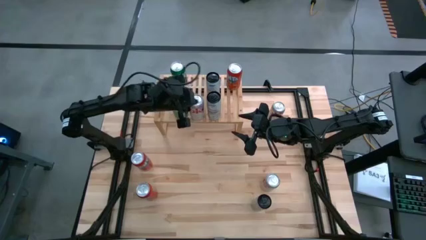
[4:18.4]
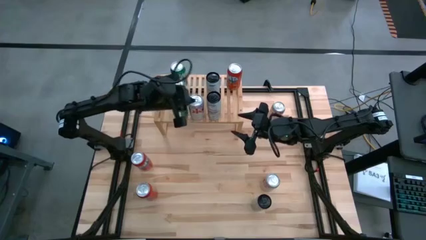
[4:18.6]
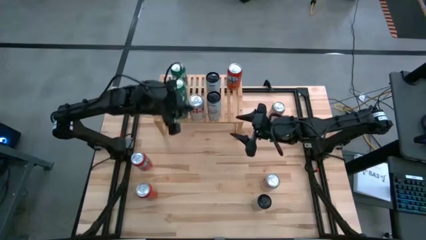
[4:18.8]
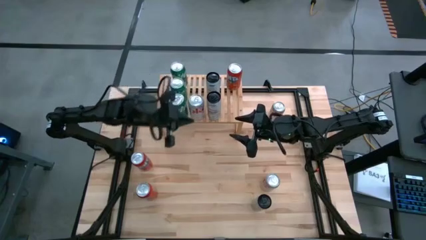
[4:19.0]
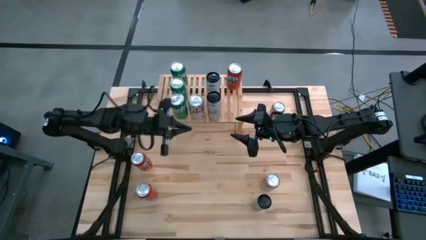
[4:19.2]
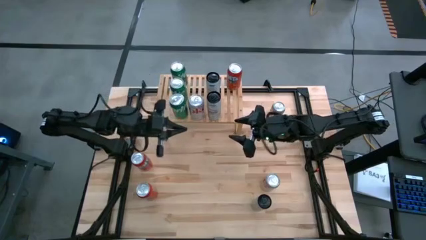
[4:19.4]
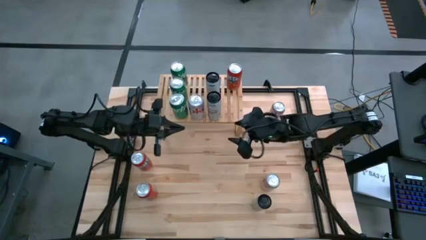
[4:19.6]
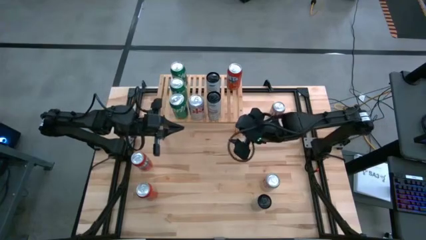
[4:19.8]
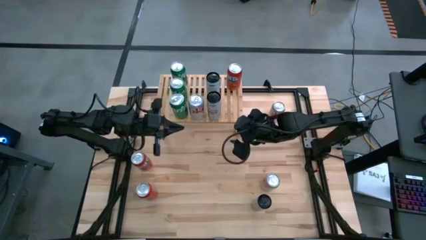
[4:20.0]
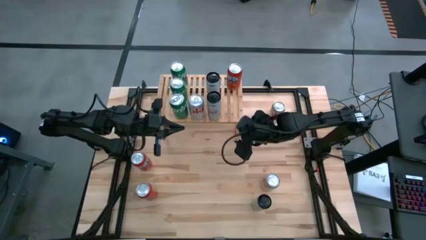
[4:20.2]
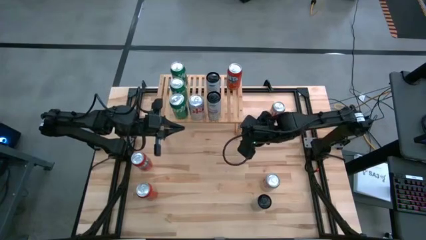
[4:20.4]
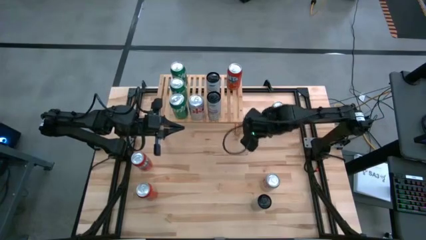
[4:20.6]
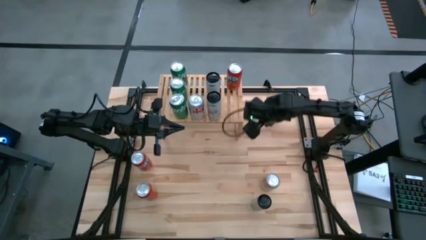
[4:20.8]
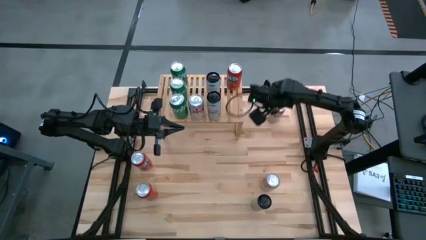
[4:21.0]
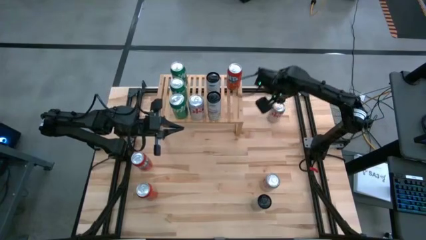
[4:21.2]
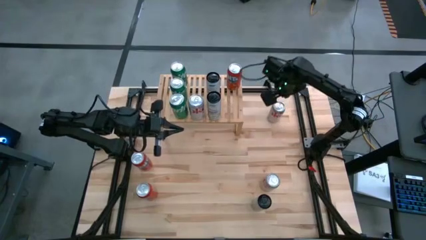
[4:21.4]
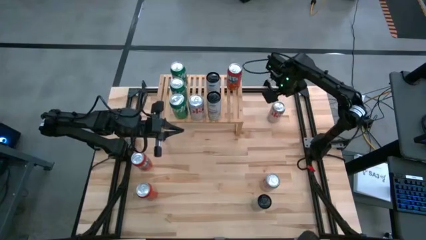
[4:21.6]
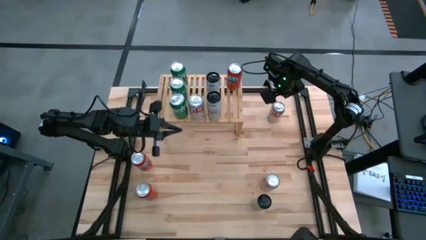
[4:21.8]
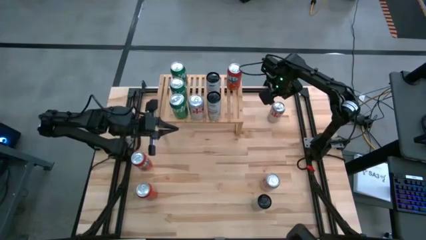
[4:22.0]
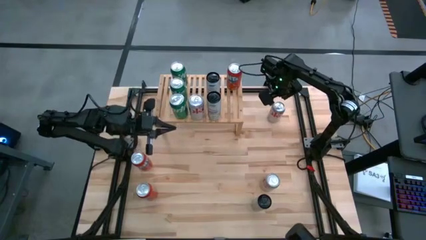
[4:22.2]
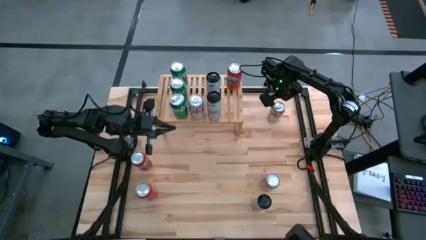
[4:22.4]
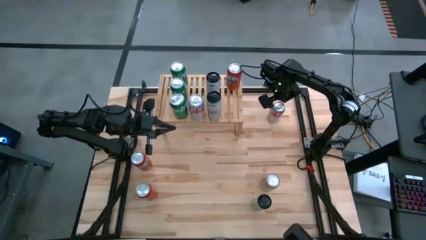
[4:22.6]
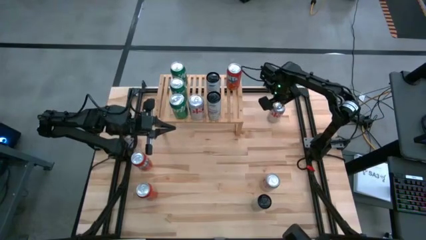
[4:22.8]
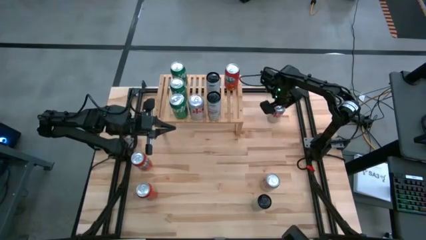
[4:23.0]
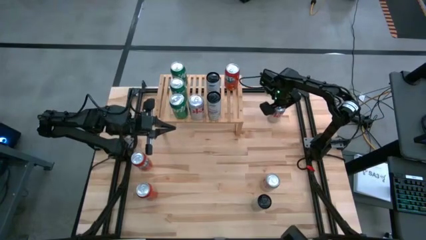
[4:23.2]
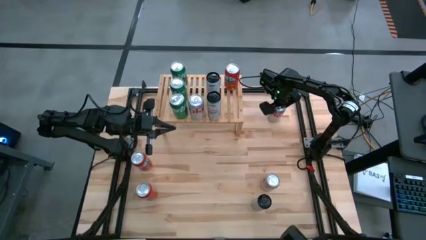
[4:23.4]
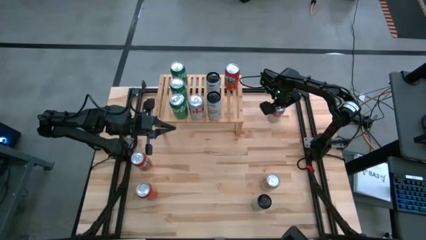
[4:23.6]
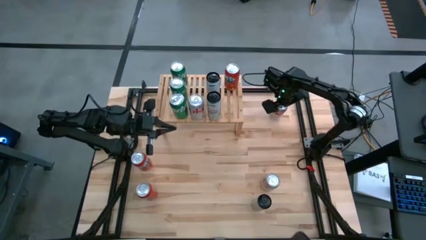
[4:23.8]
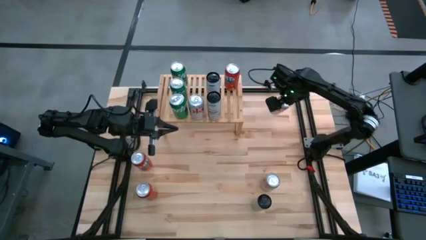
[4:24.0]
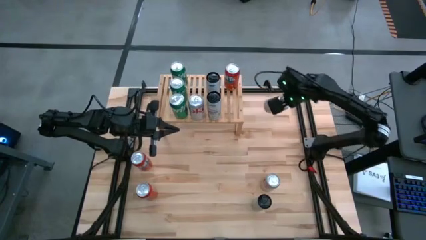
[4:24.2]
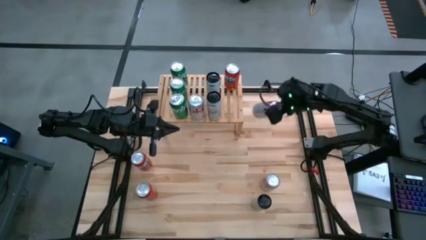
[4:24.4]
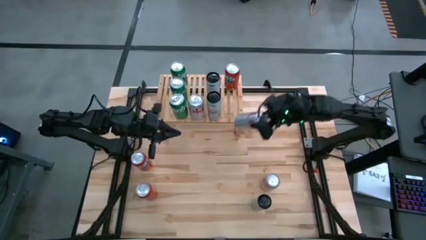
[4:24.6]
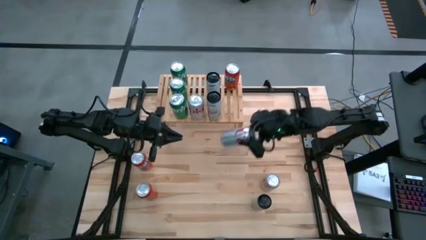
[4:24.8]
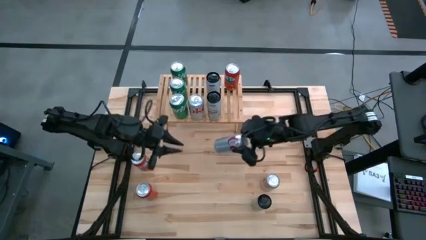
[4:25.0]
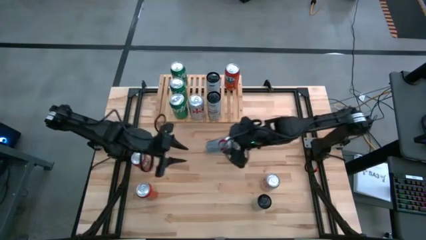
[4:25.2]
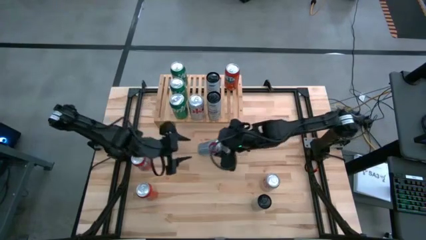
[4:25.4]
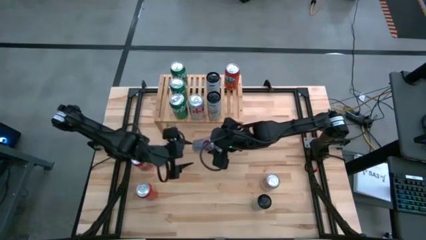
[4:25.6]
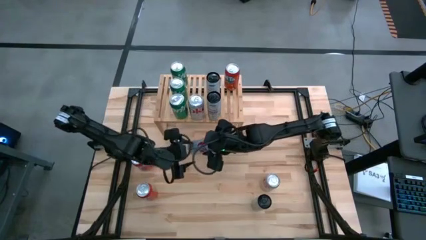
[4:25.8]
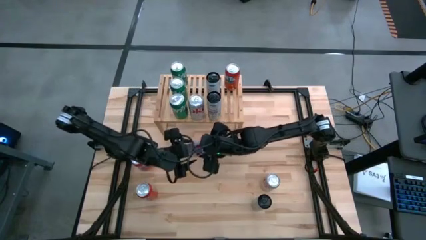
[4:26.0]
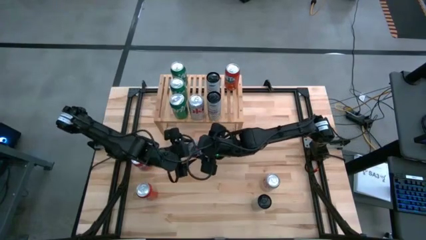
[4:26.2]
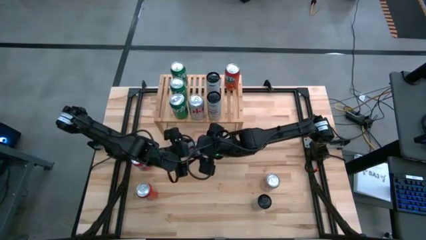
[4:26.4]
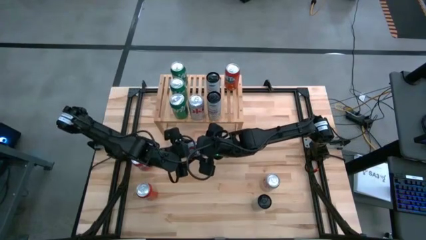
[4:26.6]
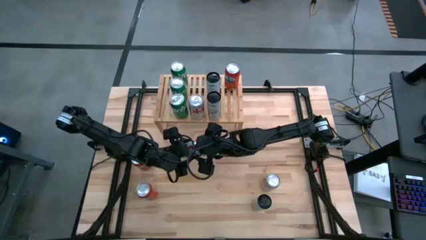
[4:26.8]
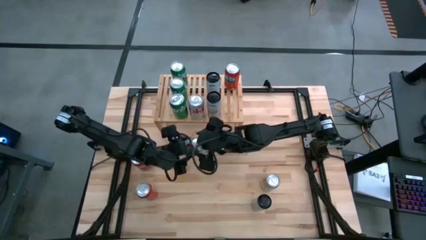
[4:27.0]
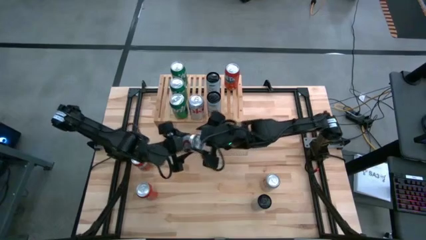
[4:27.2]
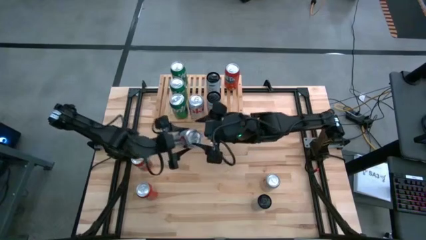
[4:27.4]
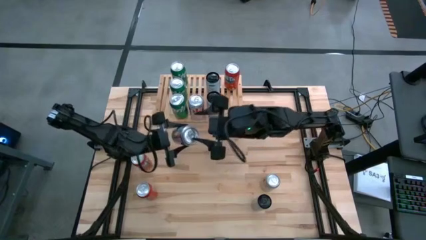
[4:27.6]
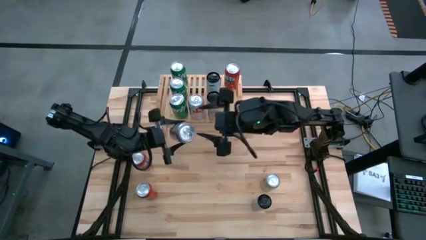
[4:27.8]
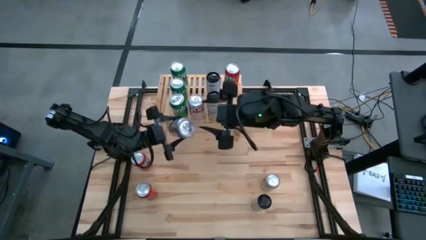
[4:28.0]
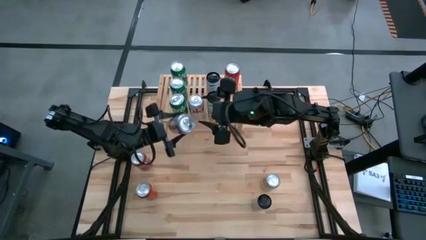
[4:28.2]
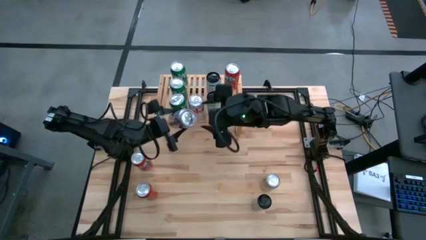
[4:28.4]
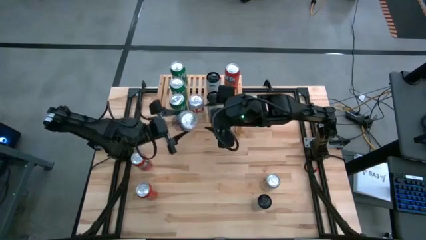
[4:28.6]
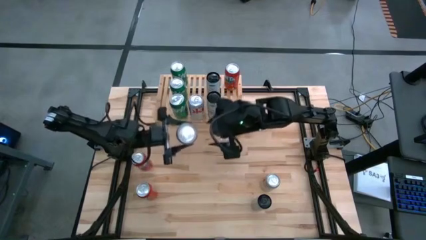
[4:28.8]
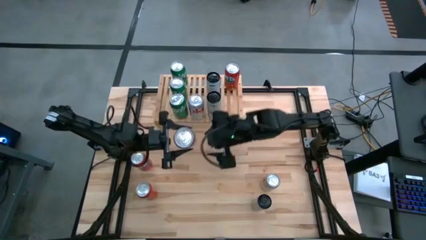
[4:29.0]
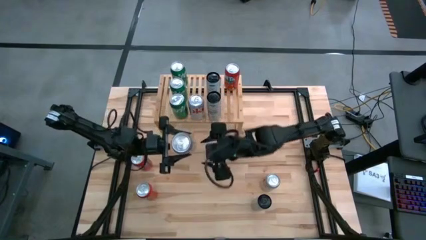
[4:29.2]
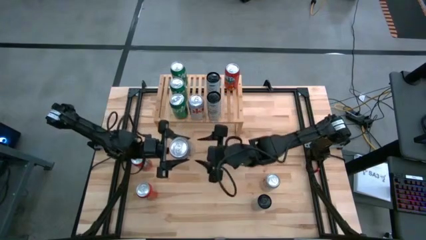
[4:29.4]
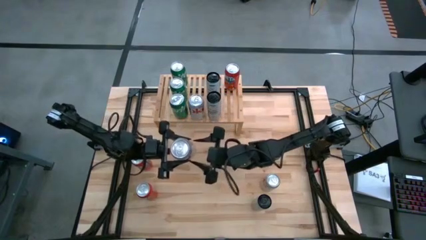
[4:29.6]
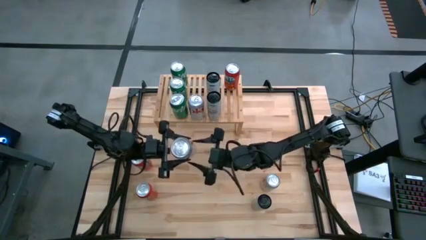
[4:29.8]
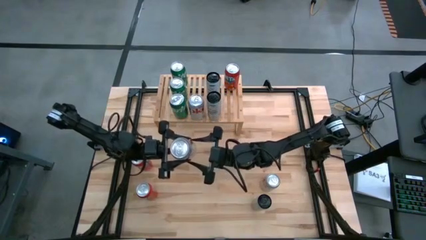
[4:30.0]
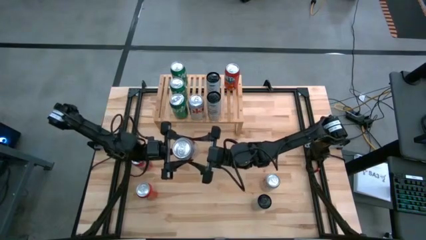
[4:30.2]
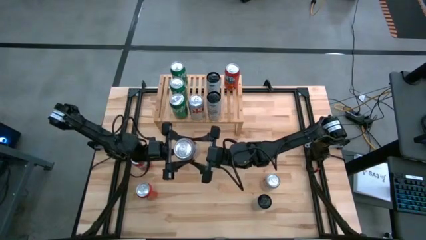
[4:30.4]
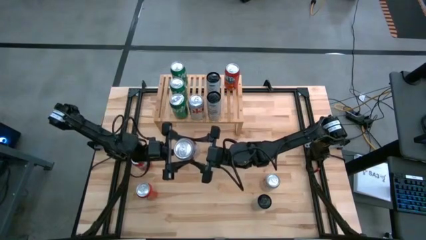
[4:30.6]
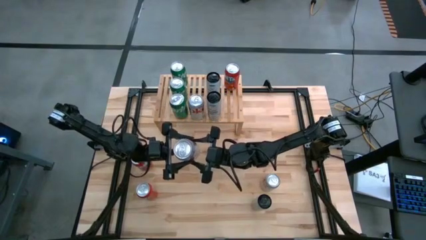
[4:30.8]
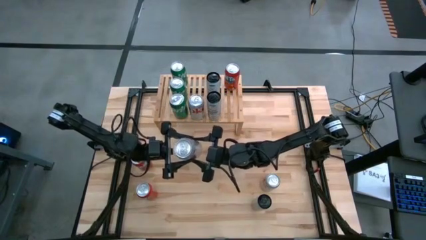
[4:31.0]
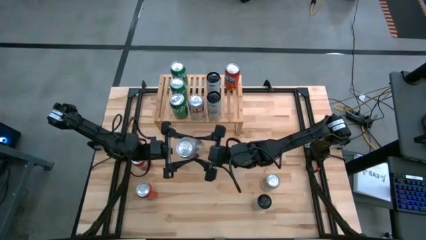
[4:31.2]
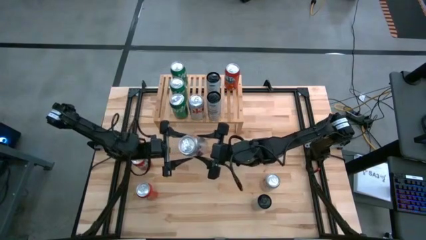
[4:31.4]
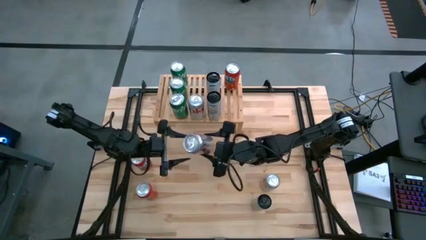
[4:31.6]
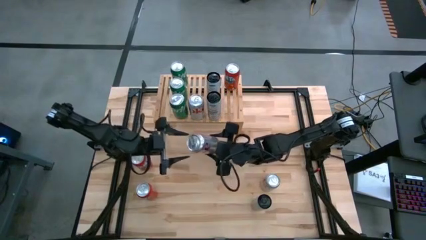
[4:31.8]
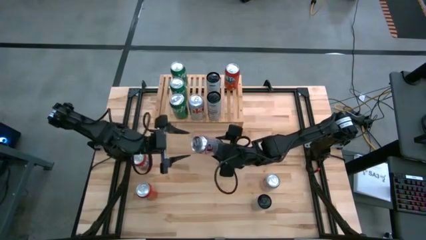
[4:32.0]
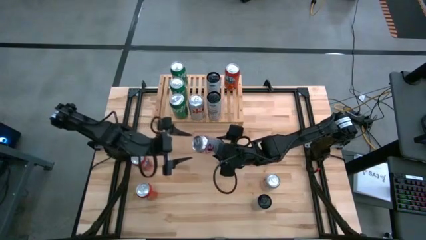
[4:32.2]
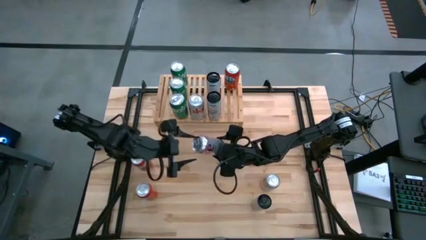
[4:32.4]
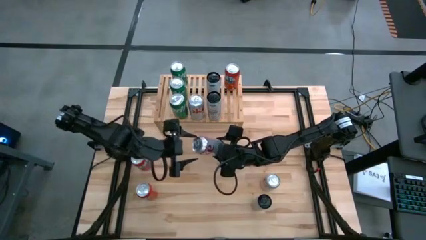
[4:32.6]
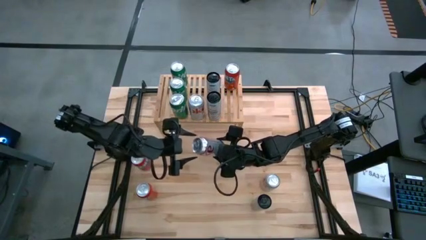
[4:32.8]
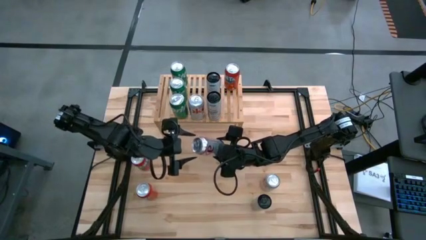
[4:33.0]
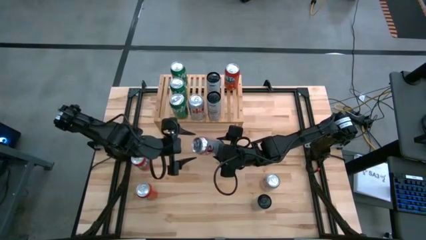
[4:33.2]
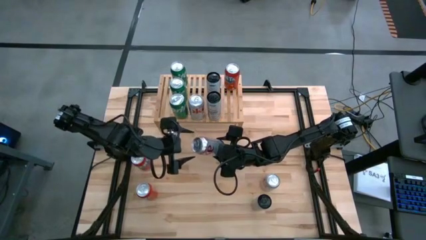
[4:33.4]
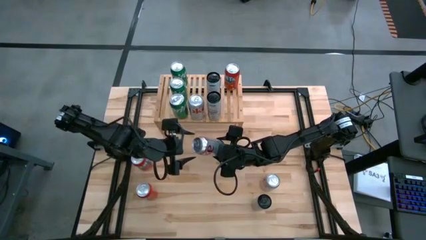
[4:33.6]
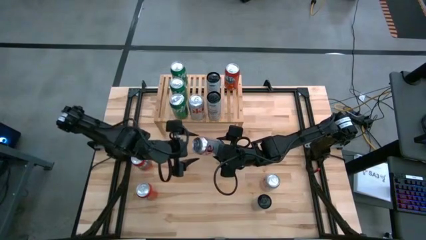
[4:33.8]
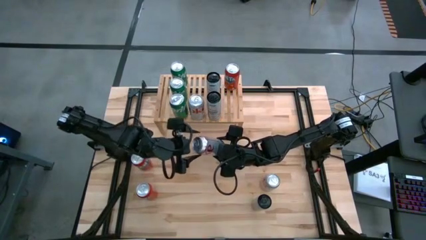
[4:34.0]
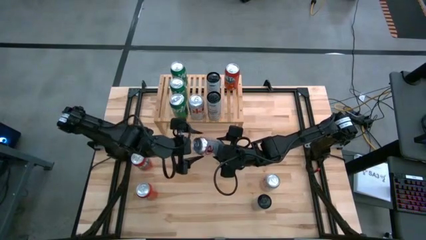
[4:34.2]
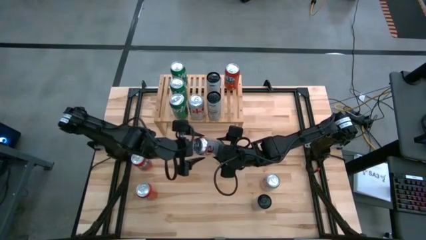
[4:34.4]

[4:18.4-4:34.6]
Task: Place canned beverage on shelf
Put the white soda can on the shelf

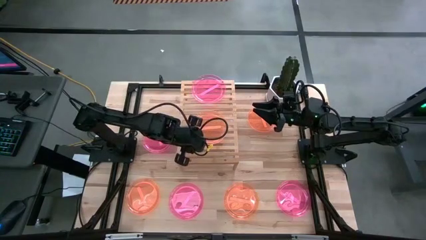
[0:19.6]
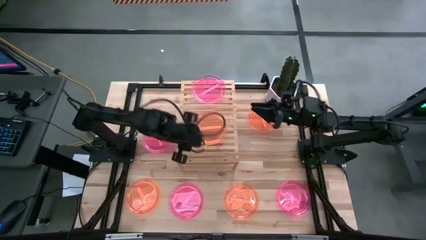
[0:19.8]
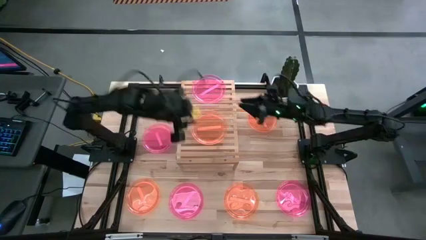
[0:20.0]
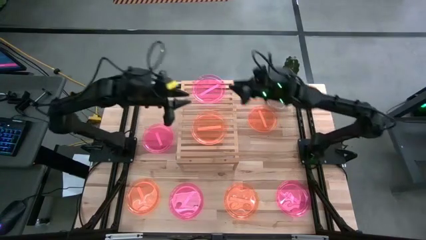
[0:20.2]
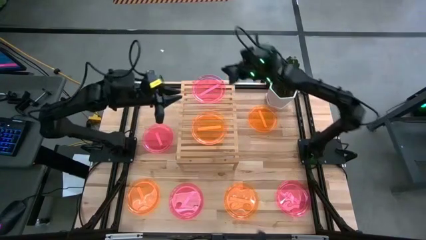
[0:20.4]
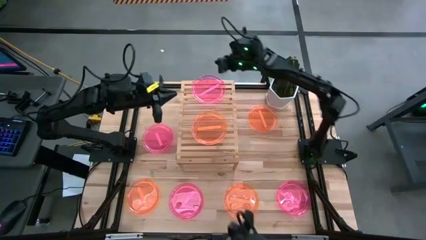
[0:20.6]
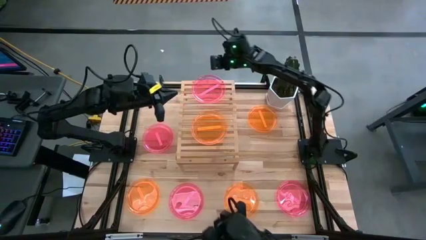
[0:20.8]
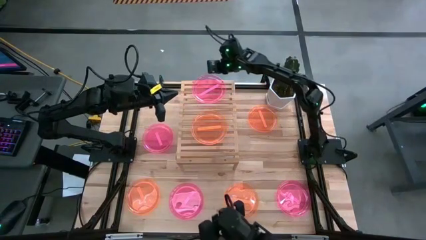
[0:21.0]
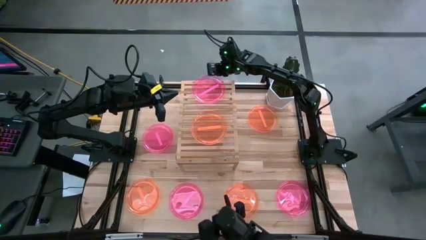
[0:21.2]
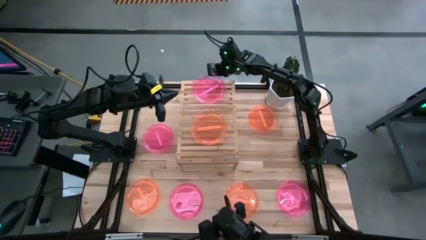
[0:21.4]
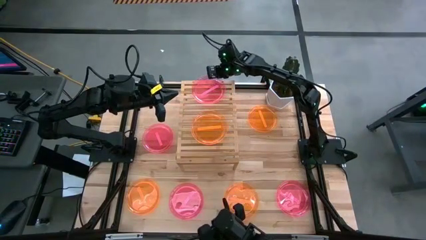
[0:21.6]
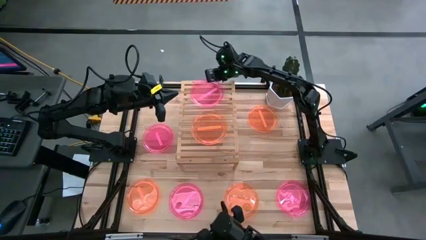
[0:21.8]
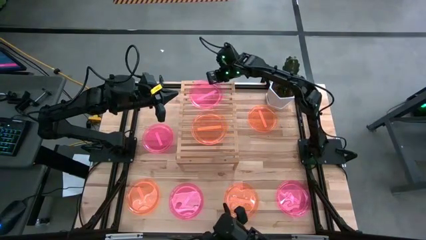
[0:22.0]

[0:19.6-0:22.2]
Task: Place and stack plates onto a shelf
Adjust the pink plate on the shelf
